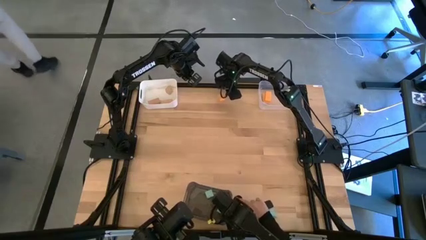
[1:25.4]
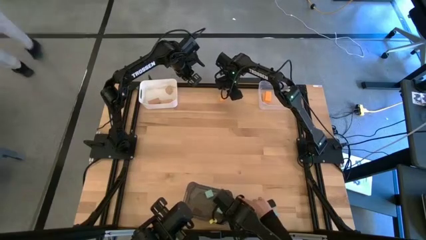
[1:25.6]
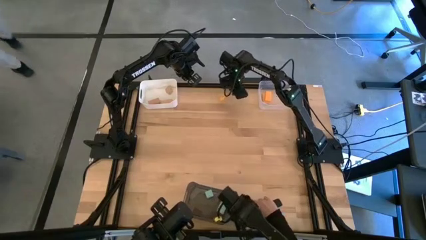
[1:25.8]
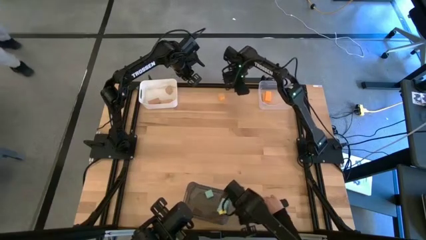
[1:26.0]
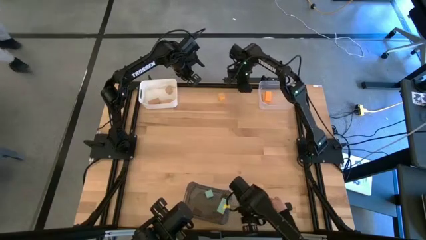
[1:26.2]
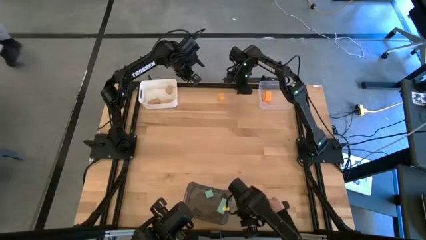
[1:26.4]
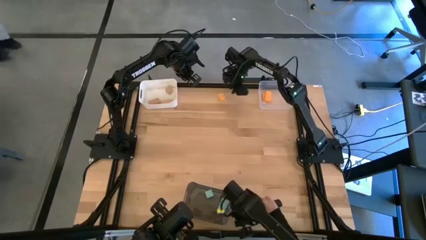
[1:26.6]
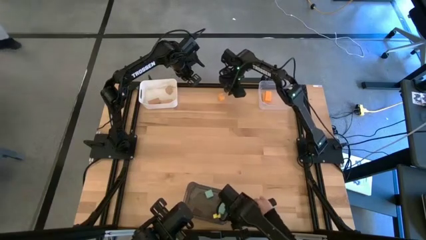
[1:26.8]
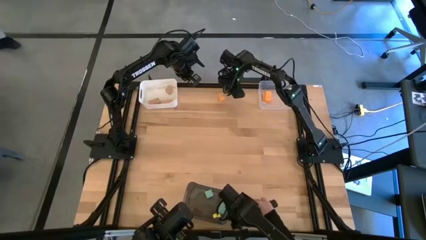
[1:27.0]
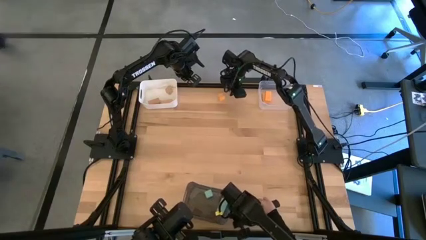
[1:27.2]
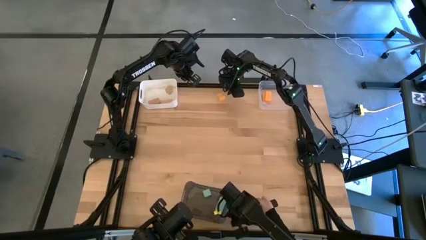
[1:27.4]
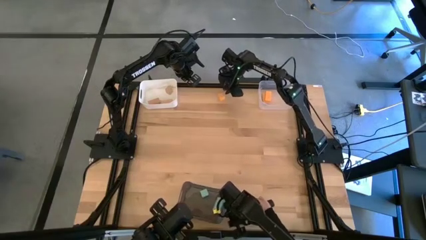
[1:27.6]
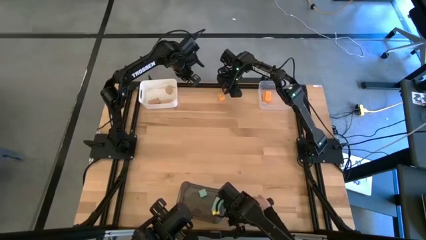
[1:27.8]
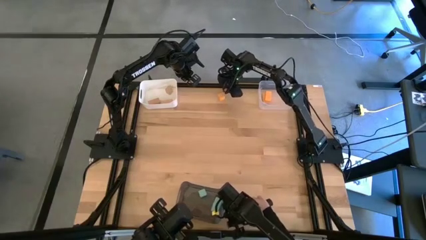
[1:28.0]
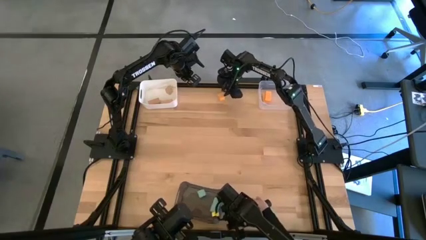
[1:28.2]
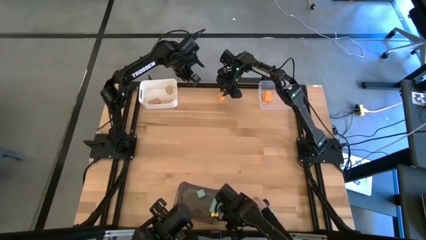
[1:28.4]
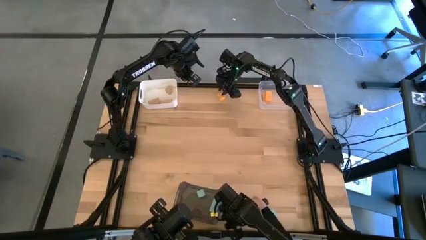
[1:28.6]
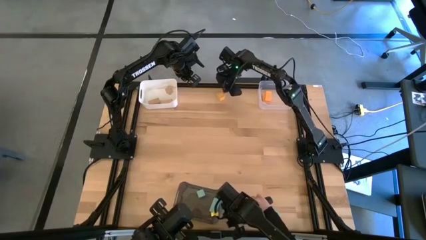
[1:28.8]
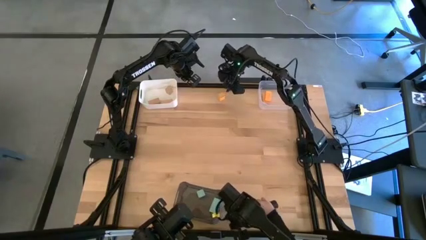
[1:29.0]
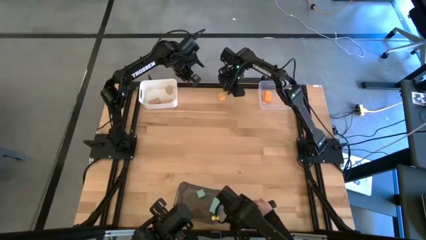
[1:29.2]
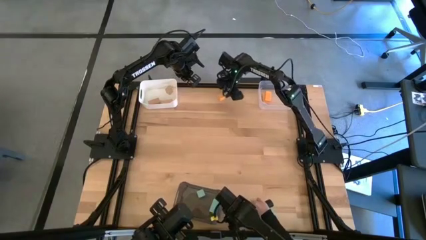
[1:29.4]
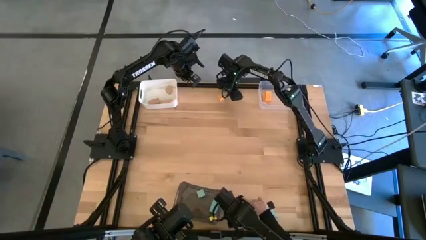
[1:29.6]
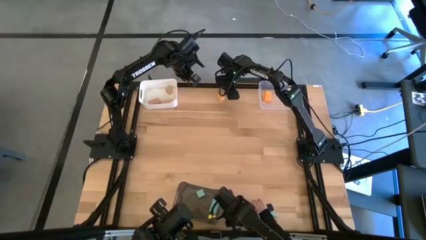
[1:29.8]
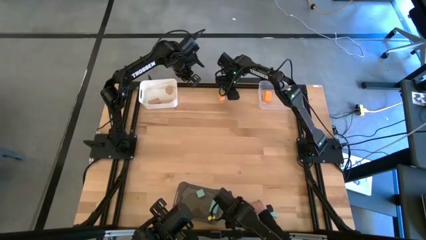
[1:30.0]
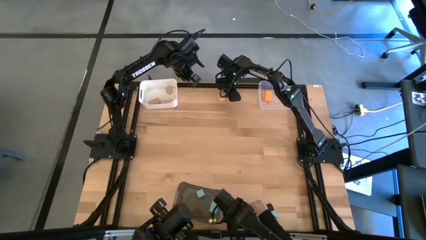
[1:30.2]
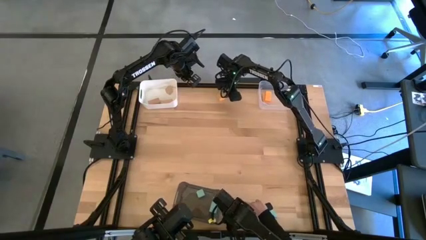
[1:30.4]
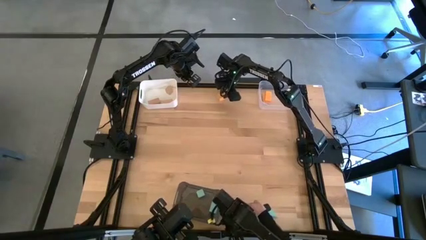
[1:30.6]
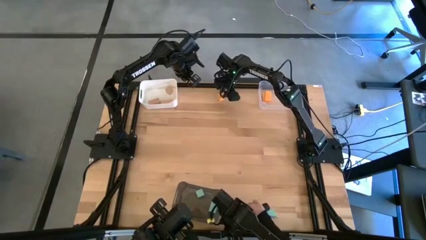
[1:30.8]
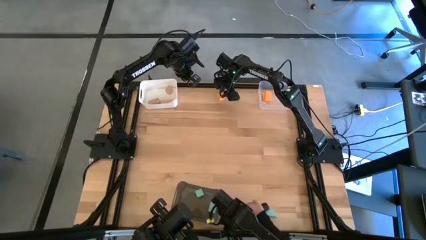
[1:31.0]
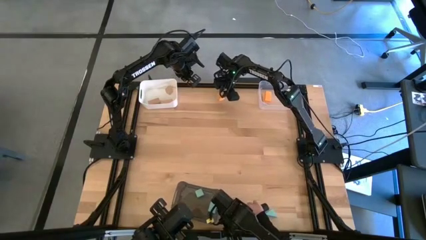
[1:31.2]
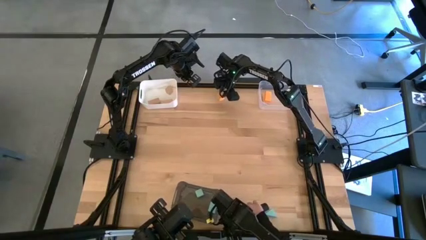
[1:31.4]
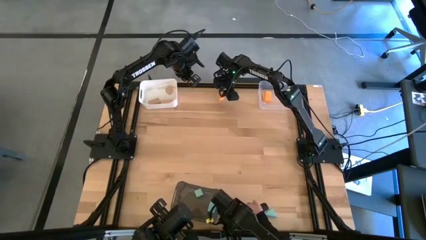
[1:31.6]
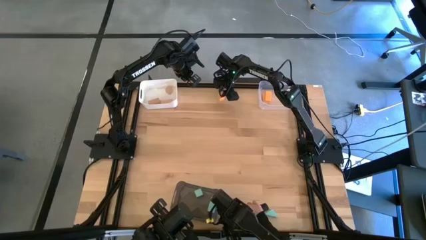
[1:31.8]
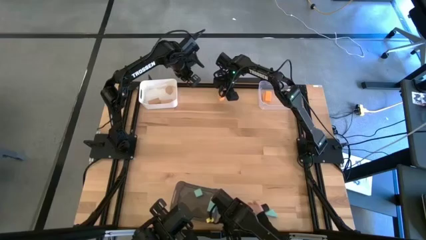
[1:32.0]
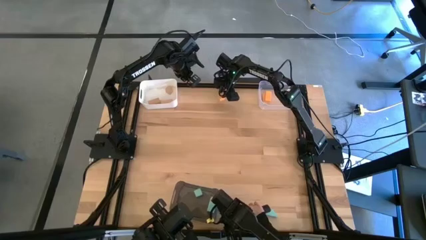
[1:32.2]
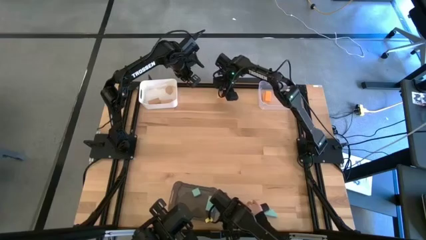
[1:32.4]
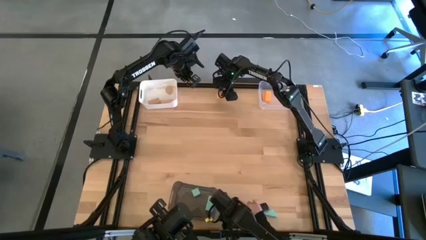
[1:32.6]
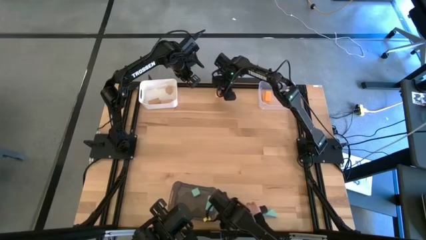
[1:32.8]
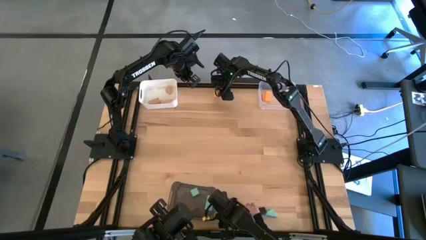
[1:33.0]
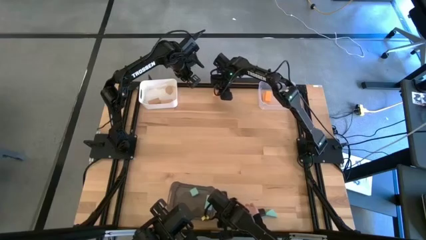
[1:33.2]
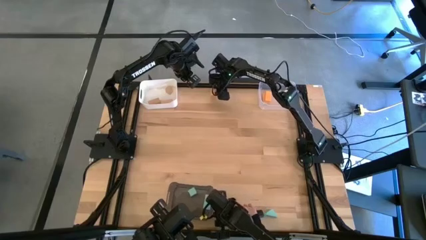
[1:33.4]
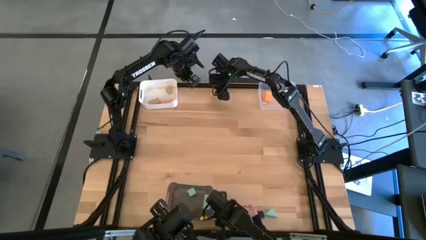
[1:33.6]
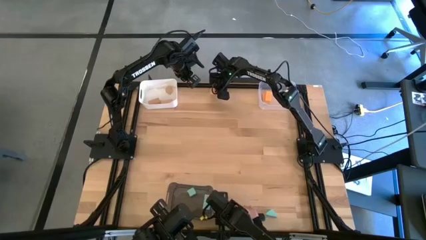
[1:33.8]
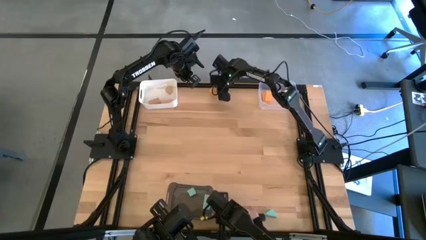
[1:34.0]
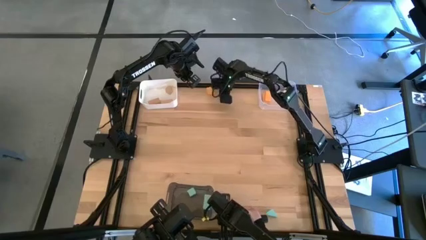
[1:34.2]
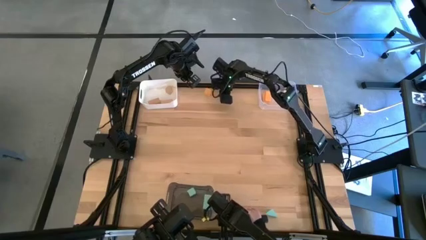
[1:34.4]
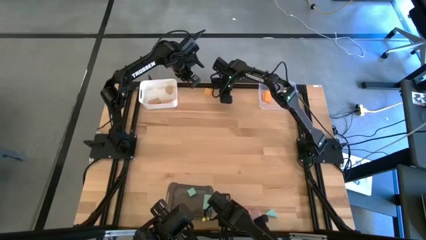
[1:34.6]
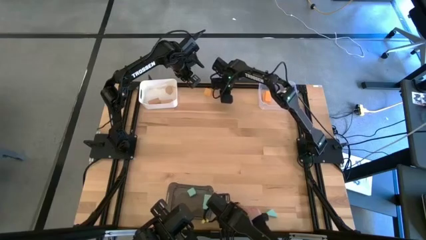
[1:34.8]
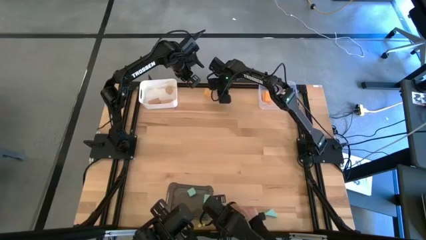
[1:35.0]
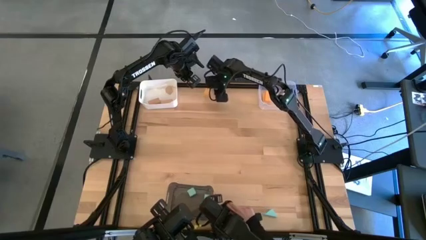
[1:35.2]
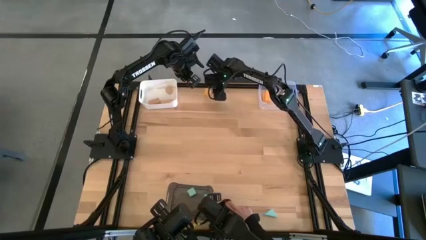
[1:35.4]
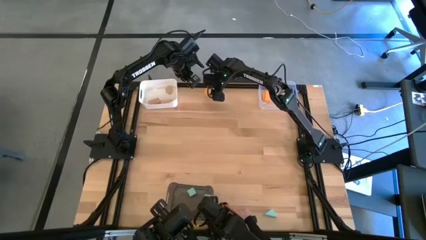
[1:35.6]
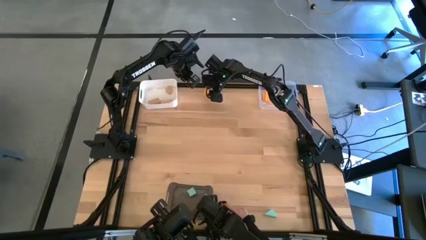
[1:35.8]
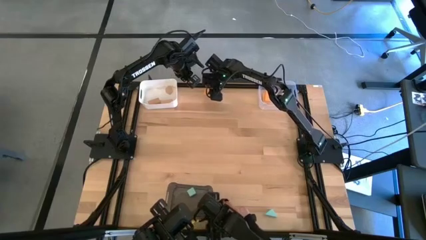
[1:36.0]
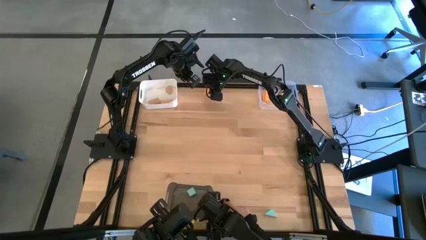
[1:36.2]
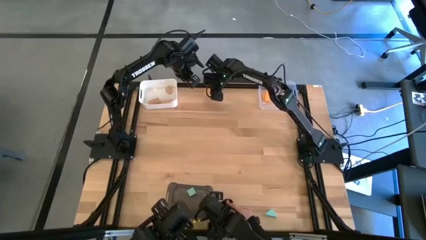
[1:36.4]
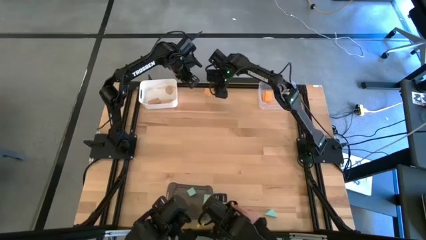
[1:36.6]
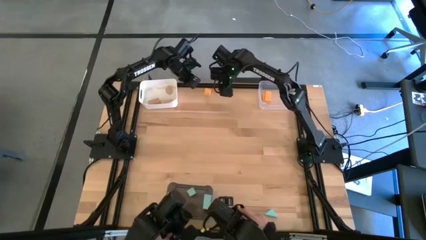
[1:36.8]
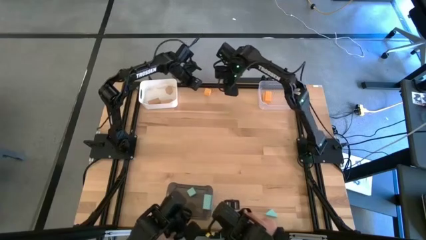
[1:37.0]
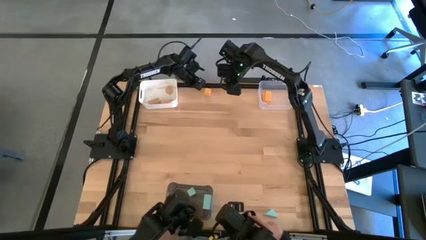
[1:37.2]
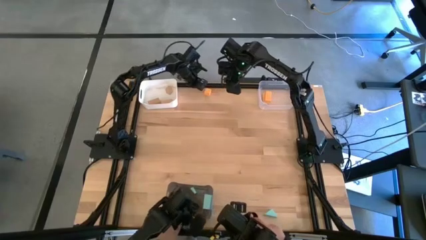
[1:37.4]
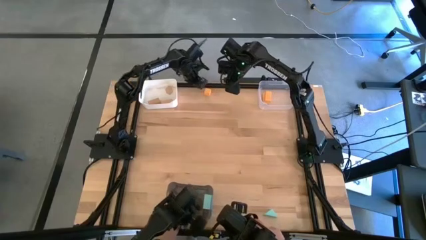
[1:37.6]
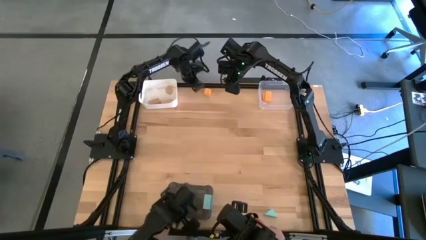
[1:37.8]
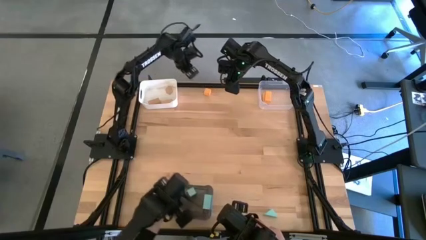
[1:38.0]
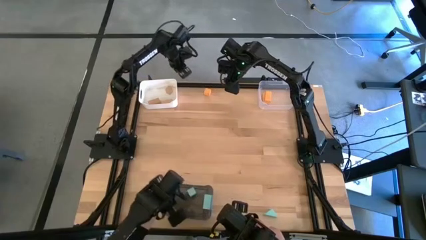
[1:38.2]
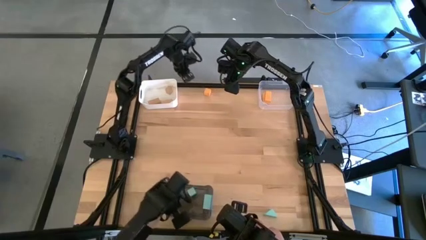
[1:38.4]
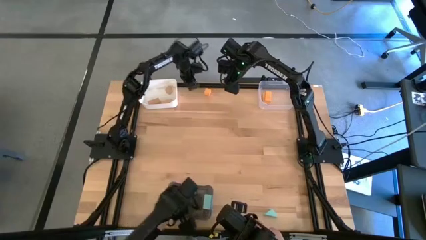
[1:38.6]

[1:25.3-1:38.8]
Task: Sort & place blocks by color
Put the yellow block into the transparent bin

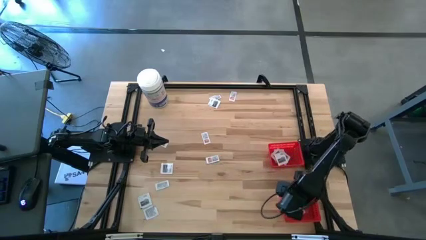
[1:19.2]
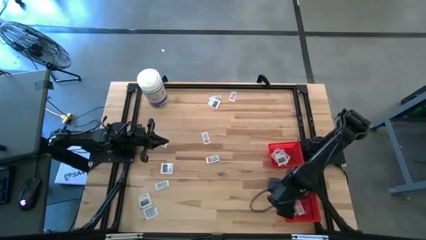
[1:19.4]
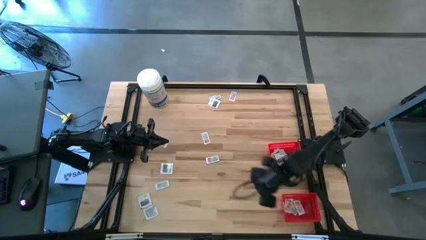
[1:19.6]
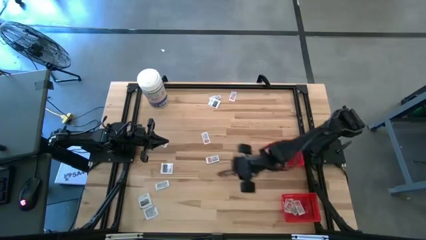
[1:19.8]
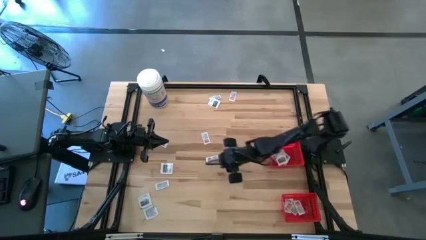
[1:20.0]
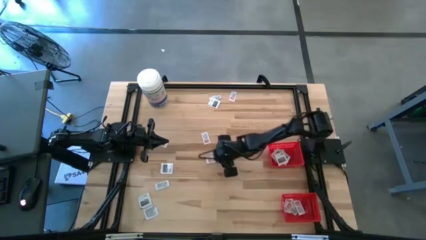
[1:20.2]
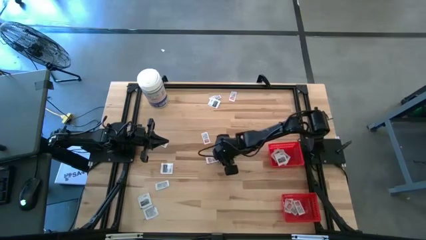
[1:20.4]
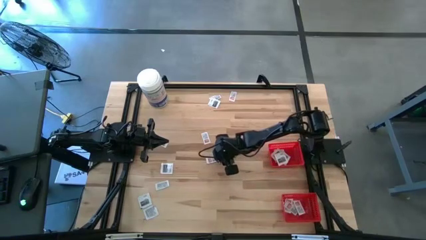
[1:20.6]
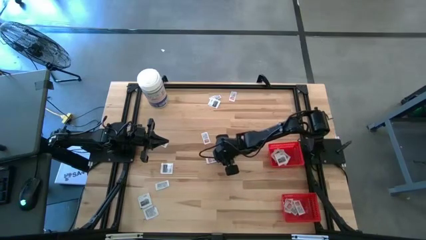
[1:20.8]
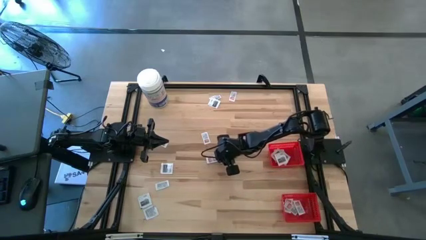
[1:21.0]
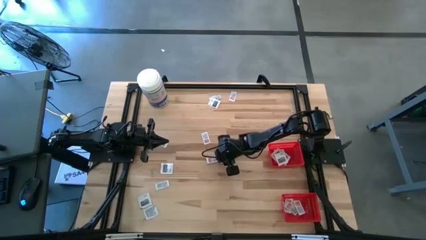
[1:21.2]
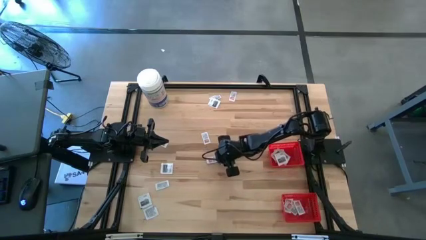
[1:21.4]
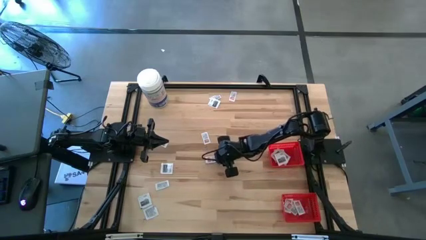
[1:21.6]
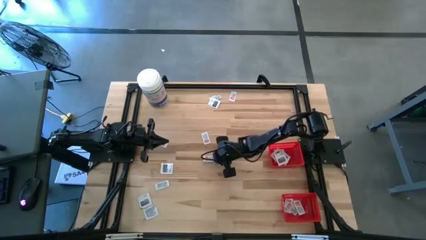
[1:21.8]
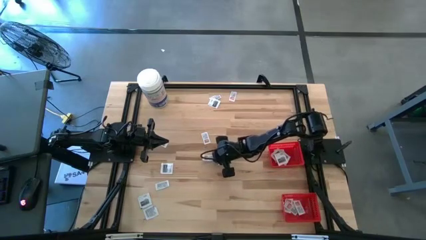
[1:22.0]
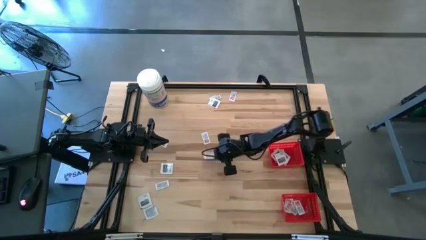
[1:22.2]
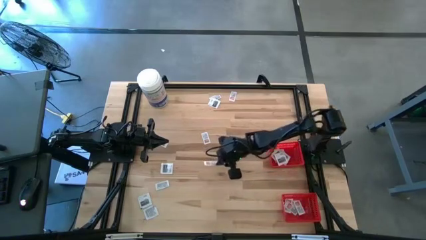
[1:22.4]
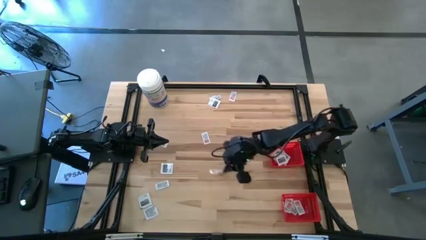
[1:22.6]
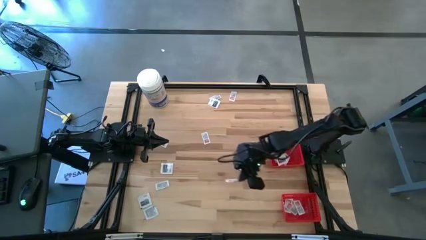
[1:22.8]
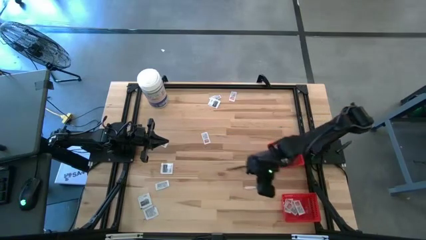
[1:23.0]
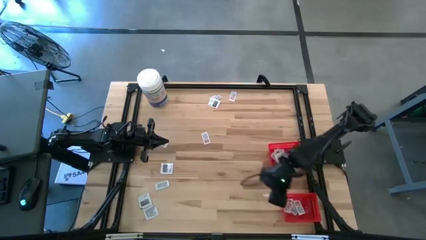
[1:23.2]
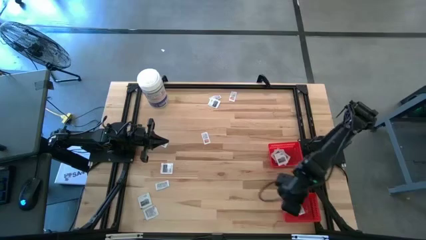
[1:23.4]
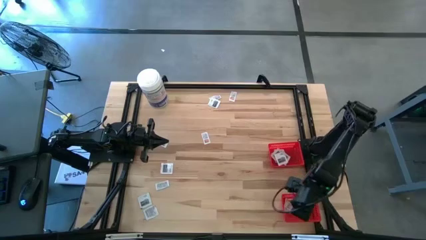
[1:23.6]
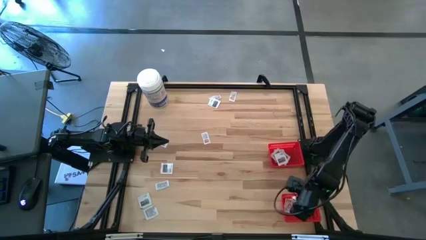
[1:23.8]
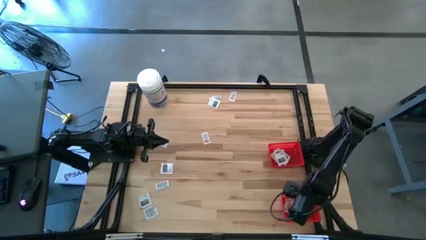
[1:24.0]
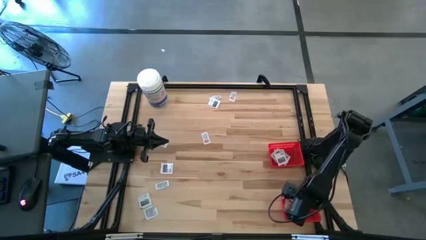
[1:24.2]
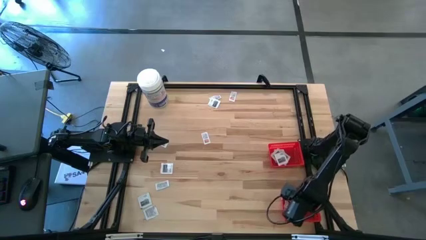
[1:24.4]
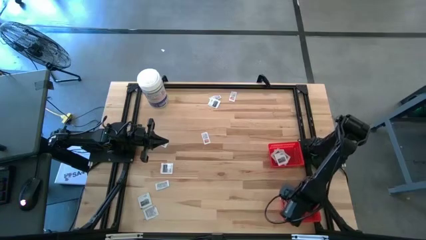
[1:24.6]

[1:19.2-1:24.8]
Task: Pick & Place First Aid Supplies
Put the orange ointment pack into the bottom red basket
